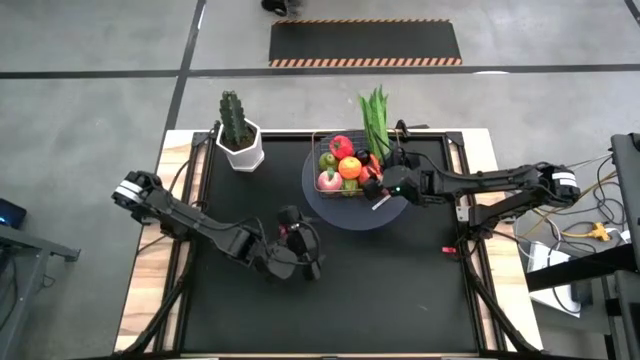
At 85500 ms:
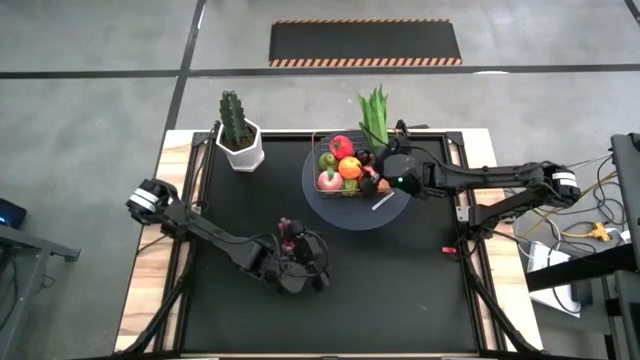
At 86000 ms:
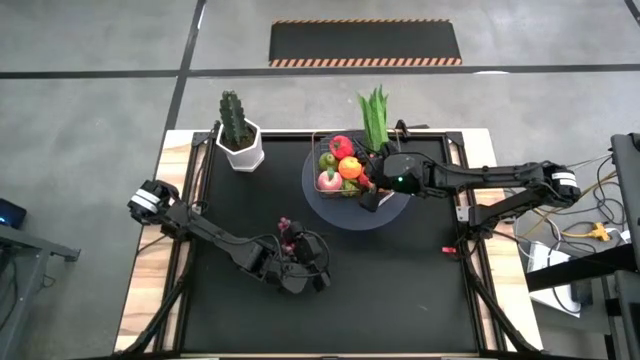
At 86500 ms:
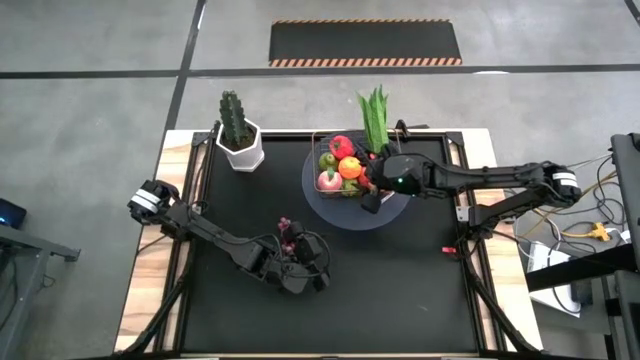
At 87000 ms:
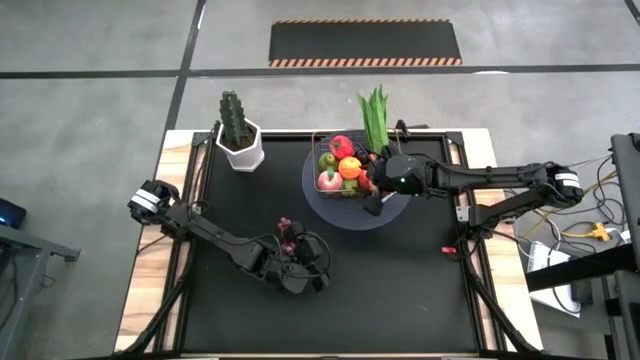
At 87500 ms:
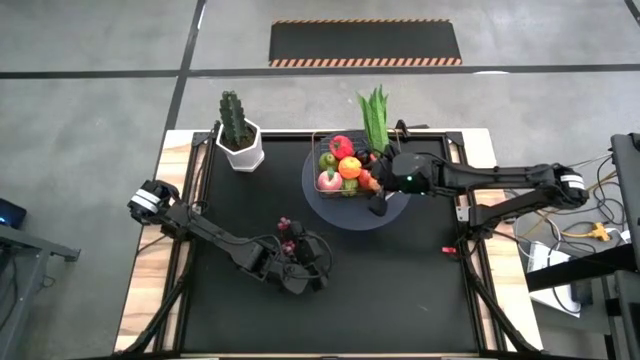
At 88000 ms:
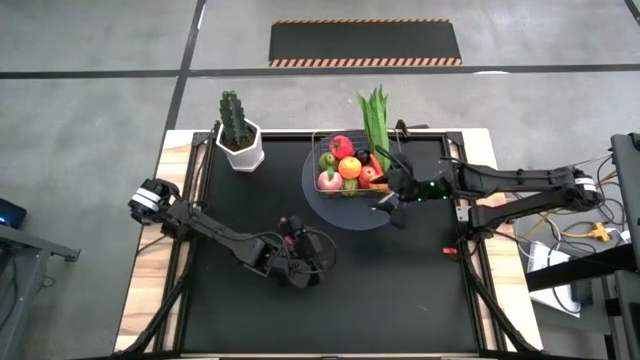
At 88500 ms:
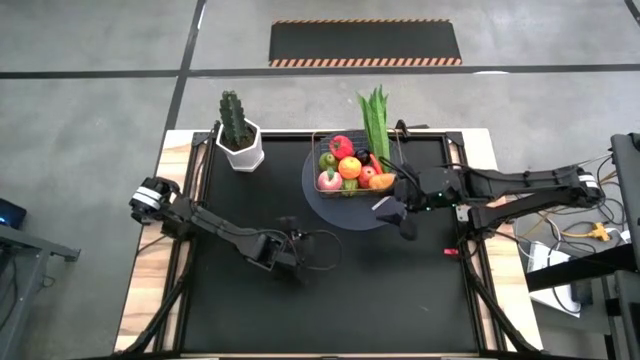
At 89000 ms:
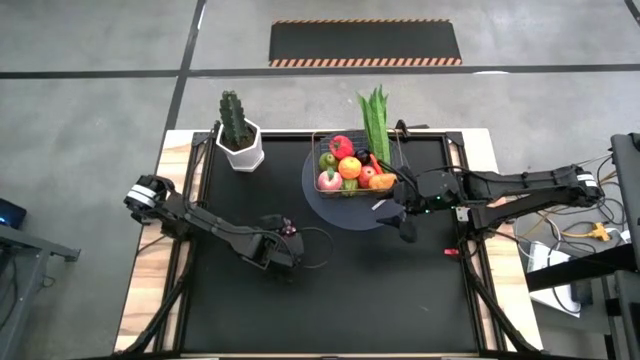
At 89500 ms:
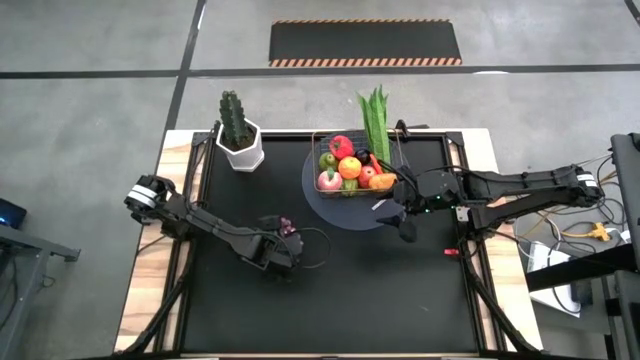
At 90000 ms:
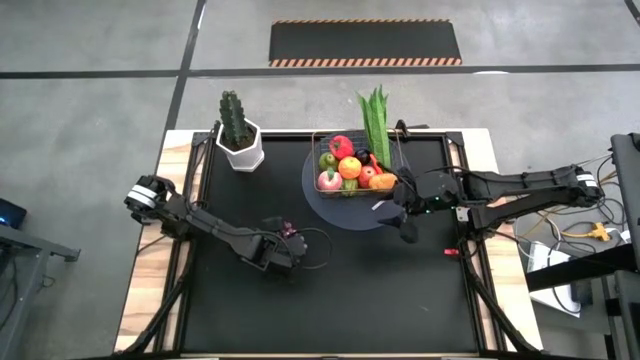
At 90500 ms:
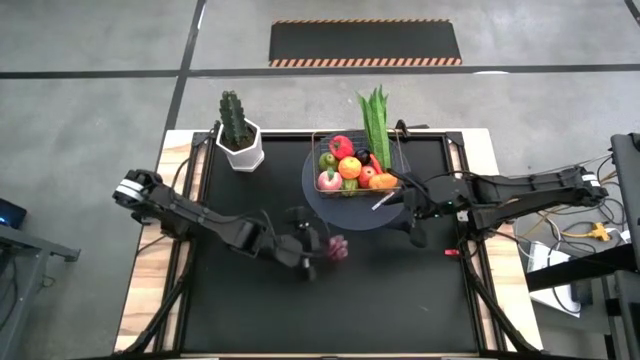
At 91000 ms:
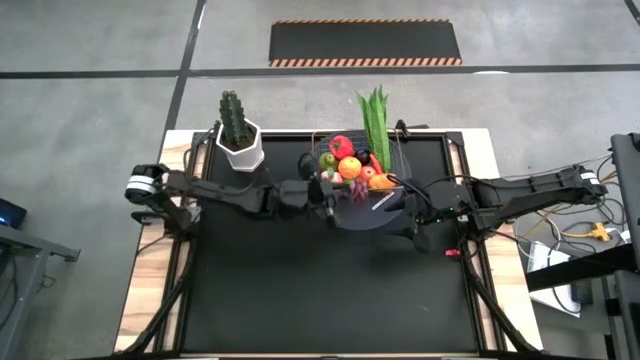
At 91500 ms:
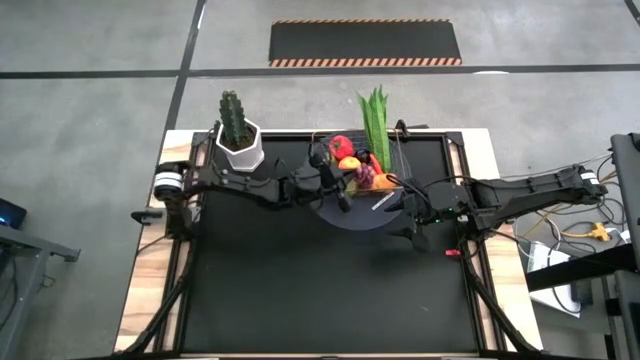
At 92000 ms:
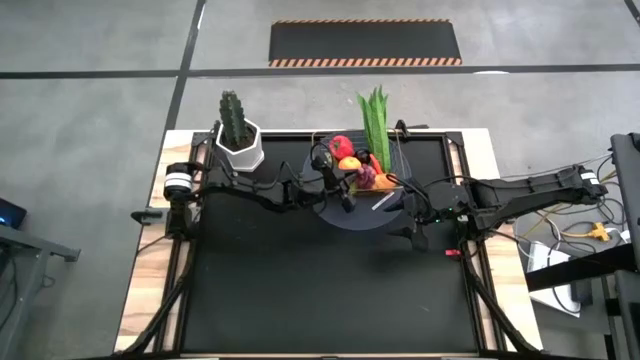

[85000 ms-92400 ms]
Task: Build produce basket
Put the red grapes into the gold wire basket

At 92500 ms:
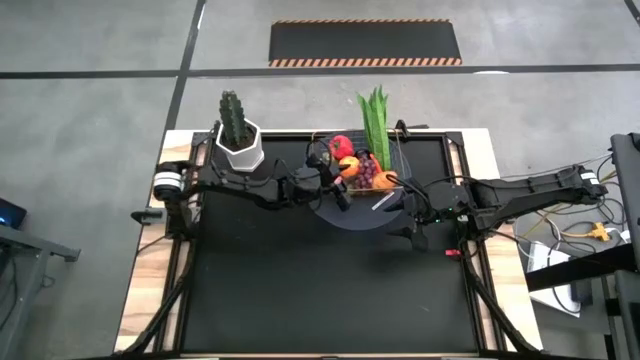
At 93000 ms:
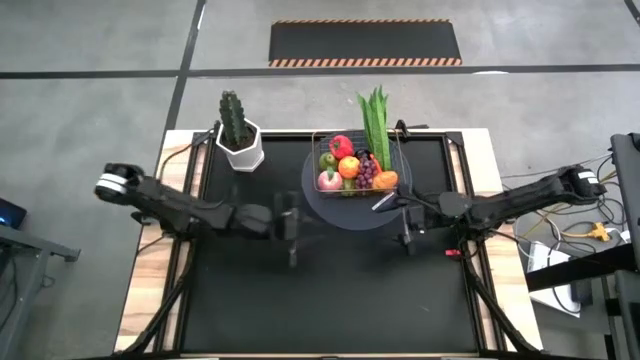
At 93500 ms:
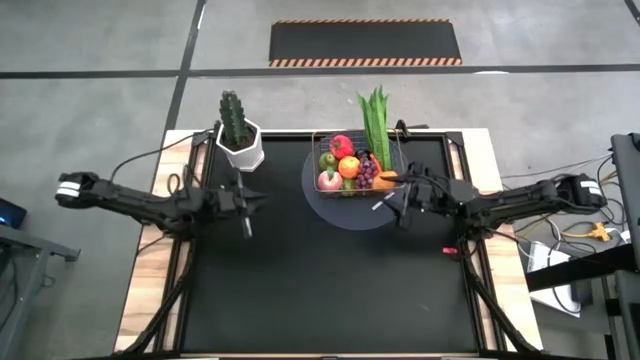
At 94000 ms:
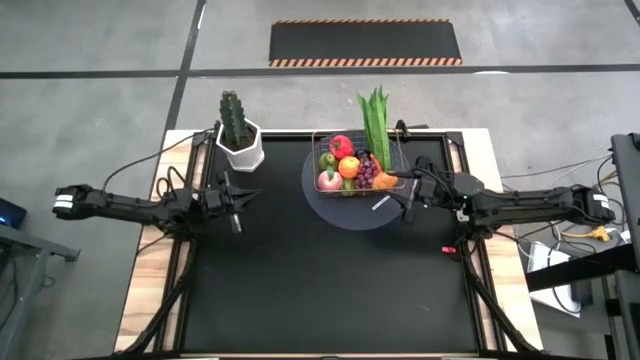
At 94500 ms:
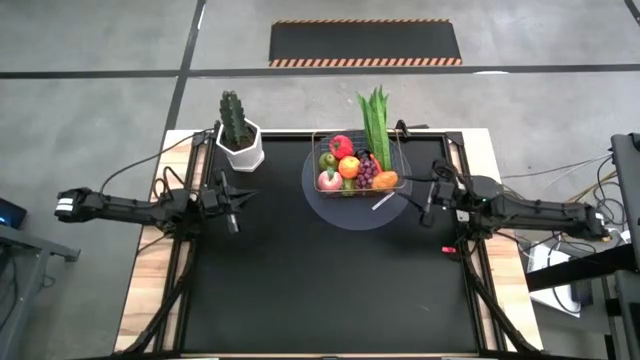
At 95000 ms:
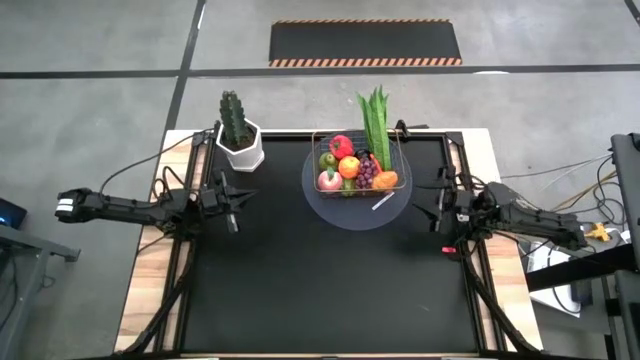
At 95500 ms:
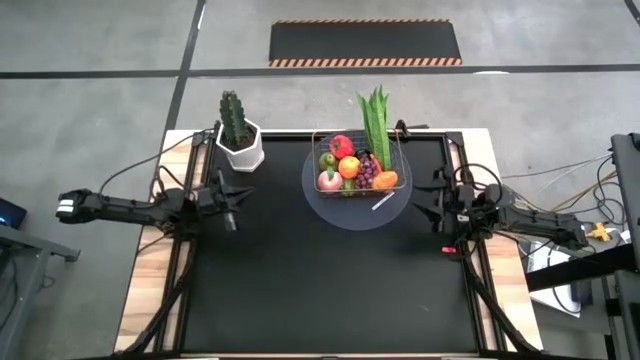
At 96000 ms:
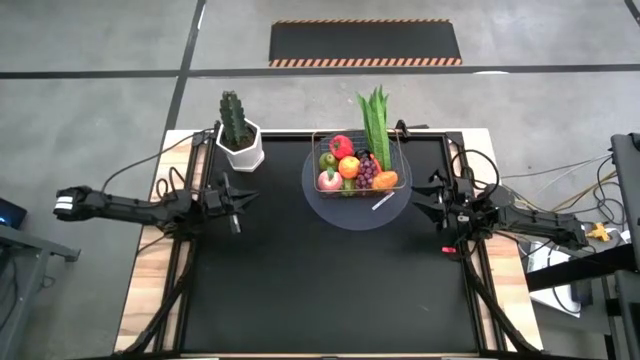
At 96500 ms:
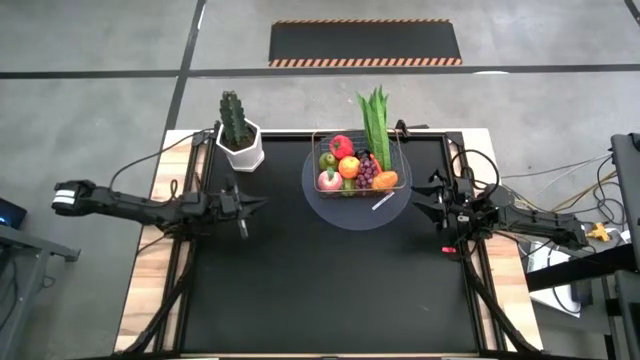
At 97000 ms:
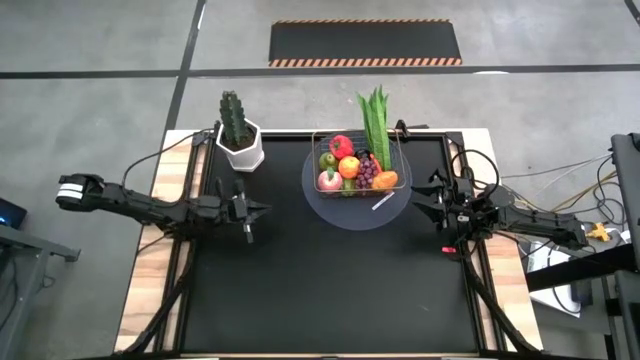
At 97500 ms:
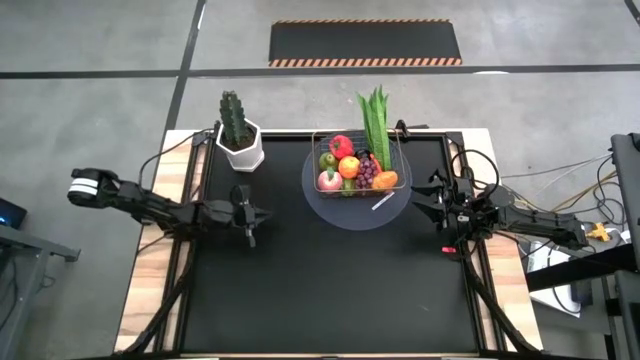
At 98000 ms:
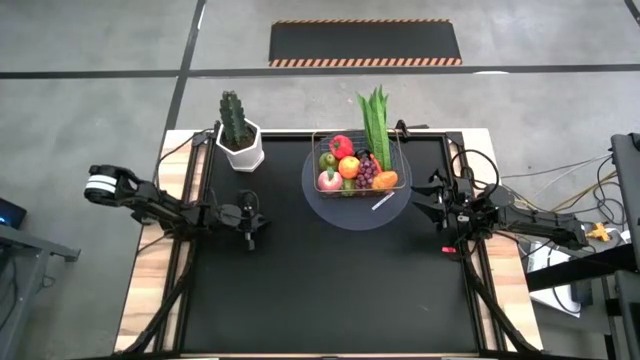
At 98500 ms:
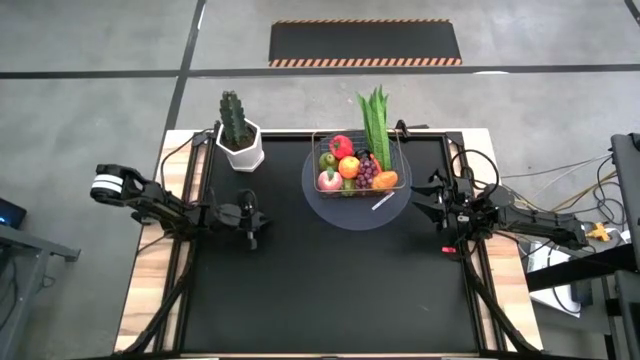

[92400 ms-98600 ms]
Return to Home Position

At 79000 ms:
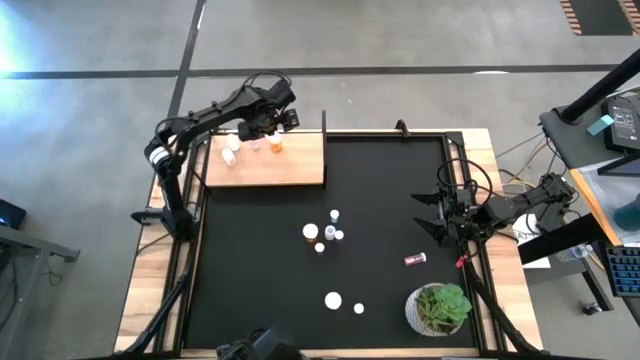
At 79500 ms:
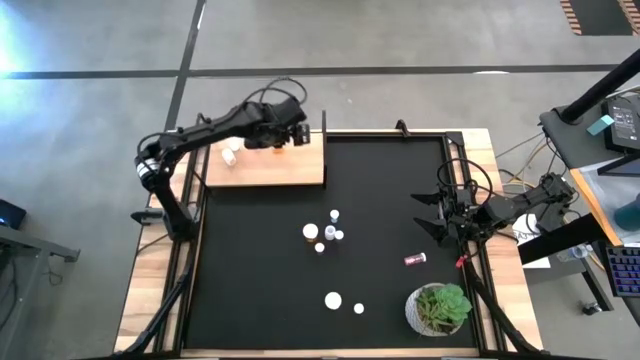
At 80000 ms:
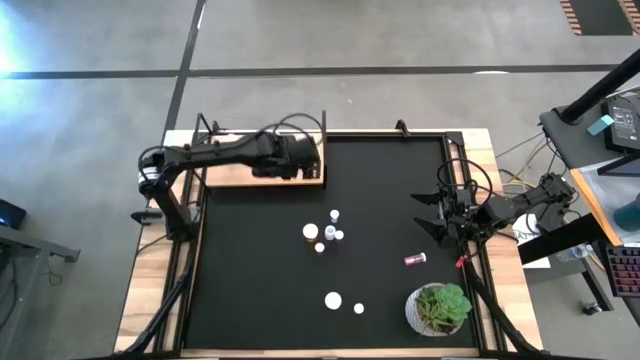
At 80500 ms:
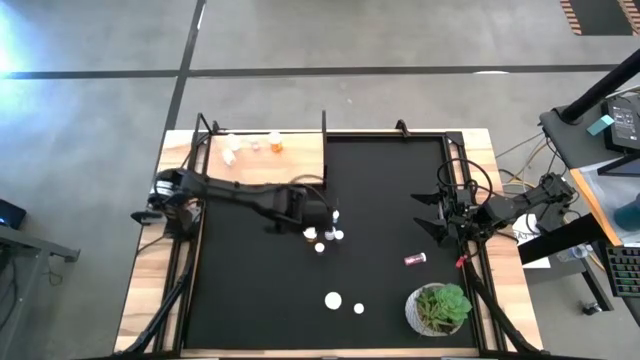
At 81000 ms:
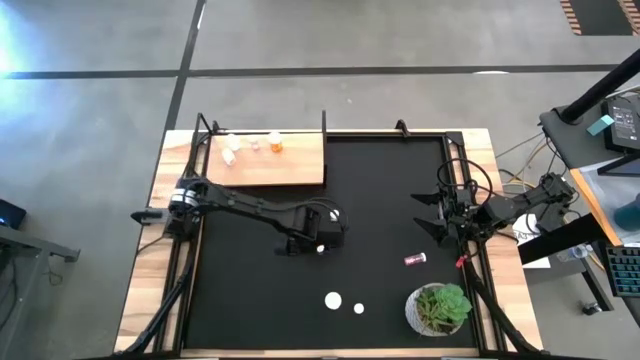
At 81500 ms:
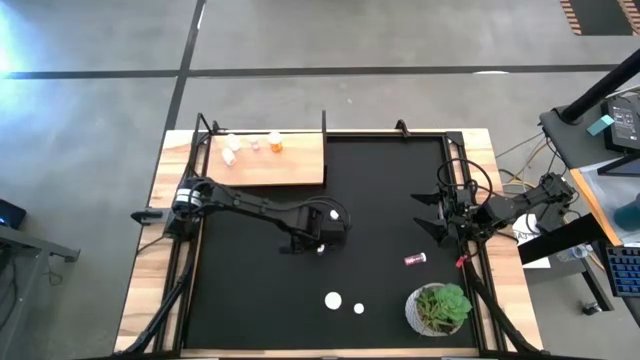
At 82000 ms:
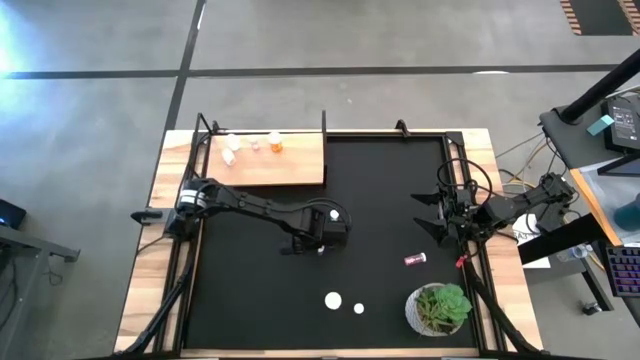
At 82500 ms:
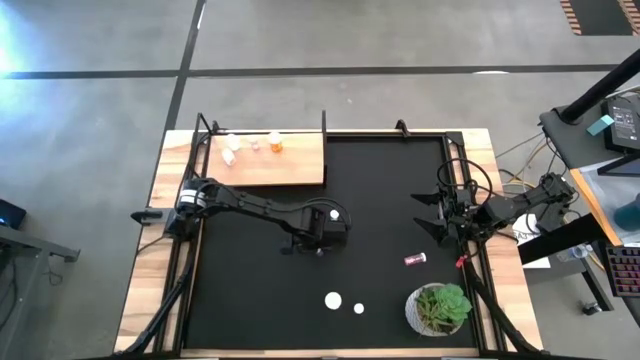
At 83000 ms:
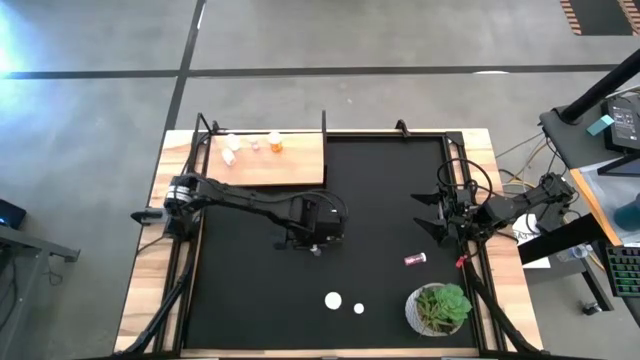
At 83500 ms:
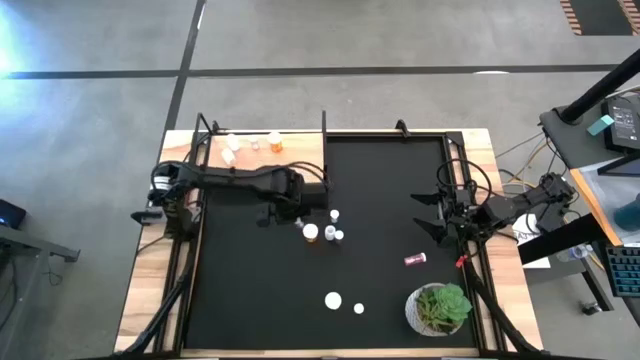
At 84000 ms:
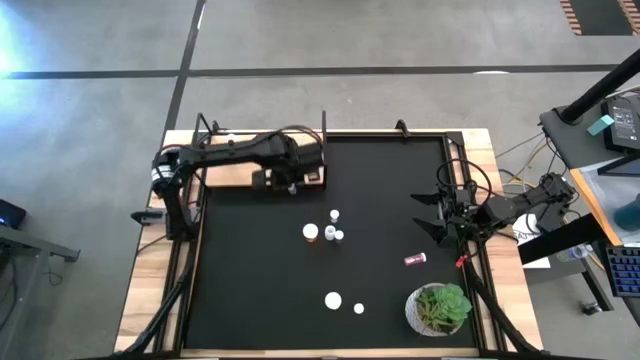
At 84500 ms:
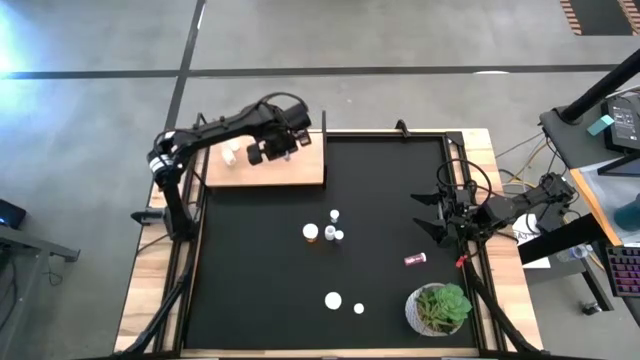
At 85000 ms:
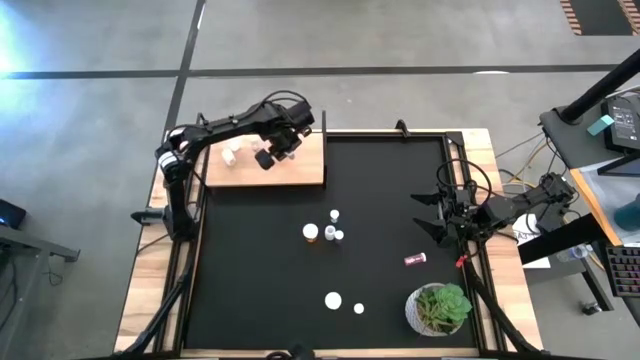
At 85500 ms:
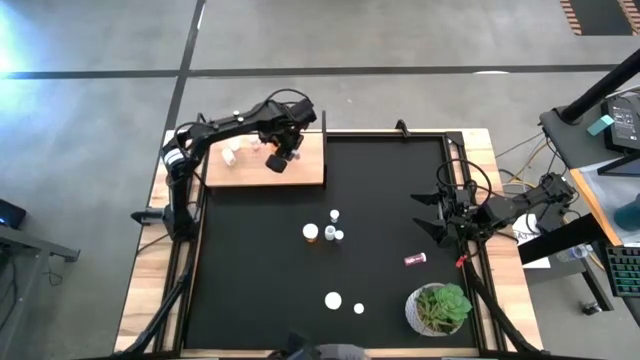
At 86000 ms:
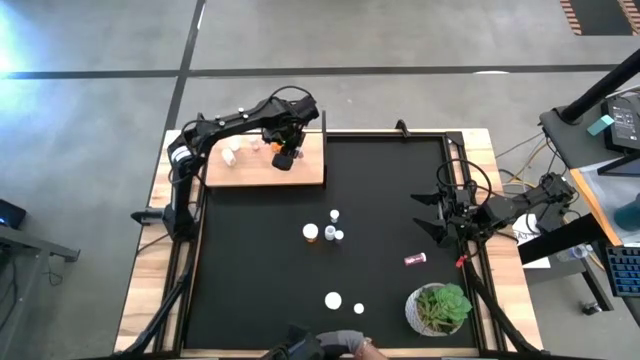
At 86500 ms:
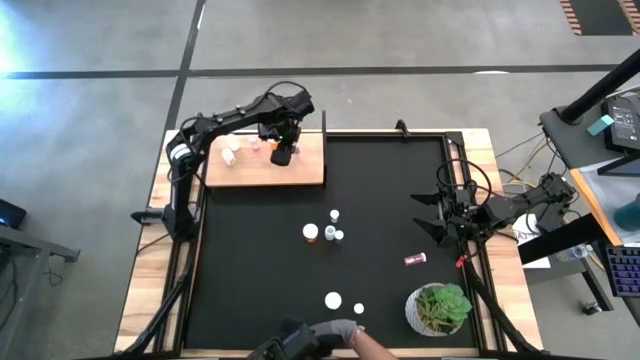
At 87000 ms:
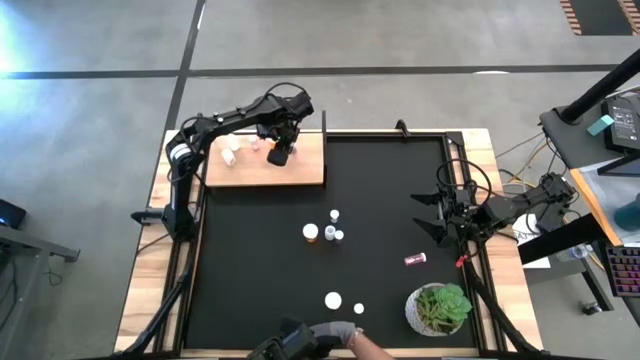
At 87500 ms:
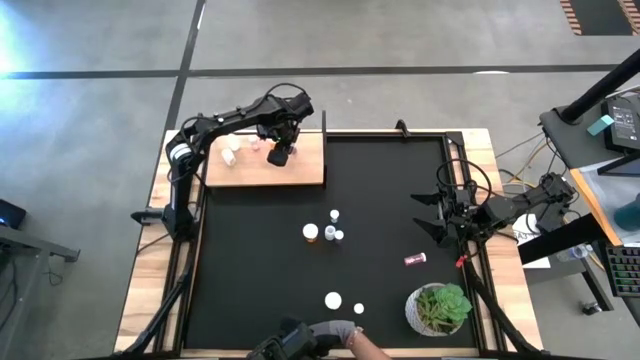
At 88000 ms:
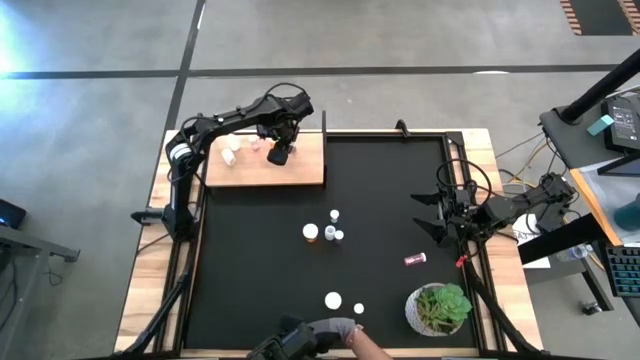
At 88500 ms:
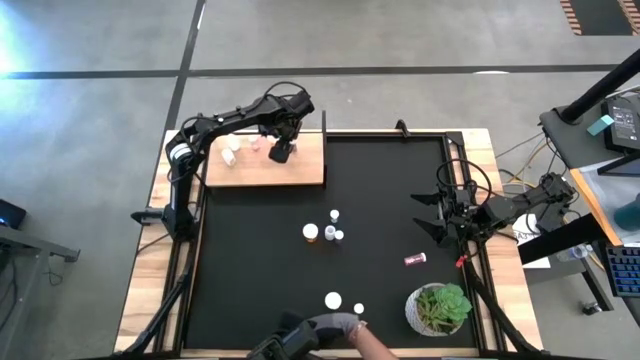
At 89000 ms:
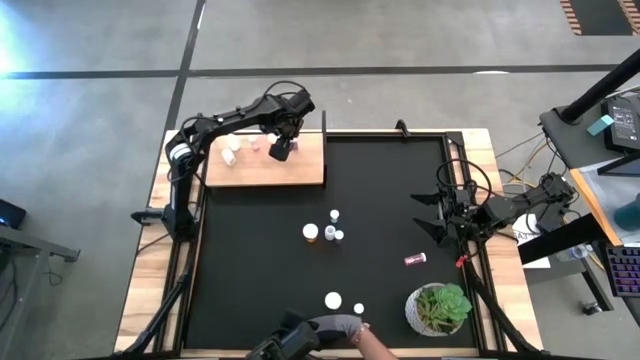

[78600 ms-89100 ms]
Task: Pick and place medicine bottles onto shelf by color
Put the bottom left blue pill on the shelf
